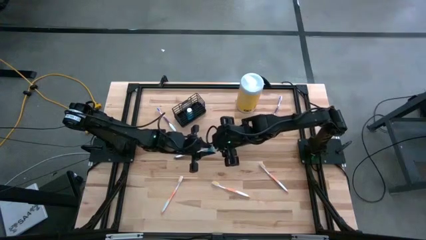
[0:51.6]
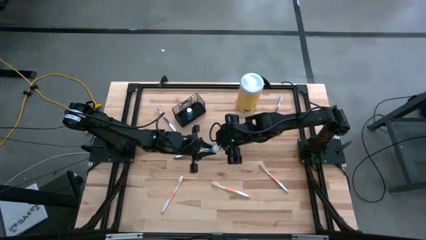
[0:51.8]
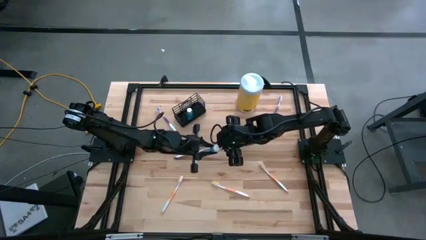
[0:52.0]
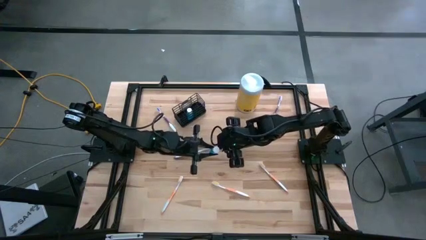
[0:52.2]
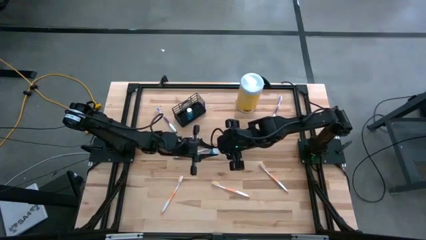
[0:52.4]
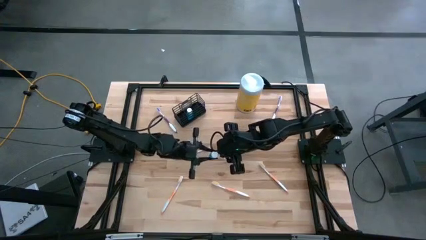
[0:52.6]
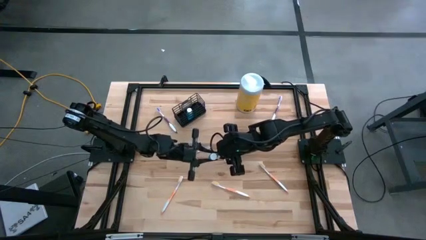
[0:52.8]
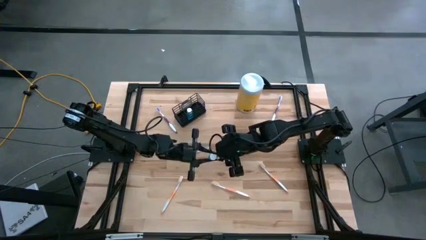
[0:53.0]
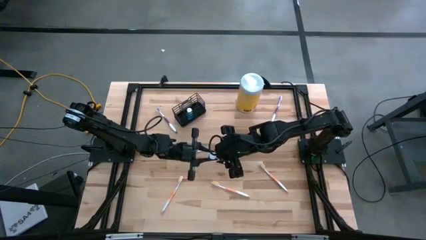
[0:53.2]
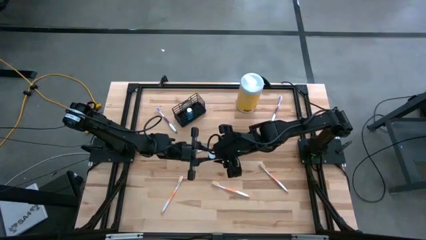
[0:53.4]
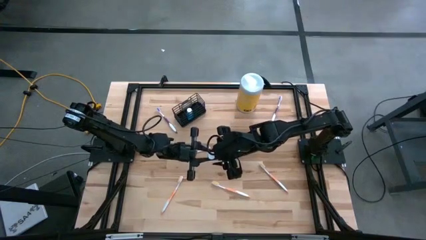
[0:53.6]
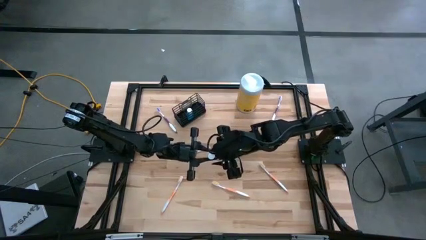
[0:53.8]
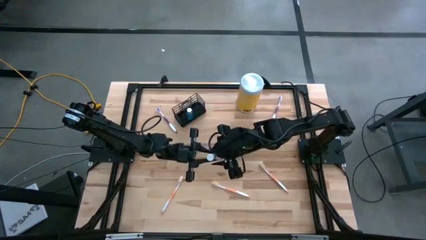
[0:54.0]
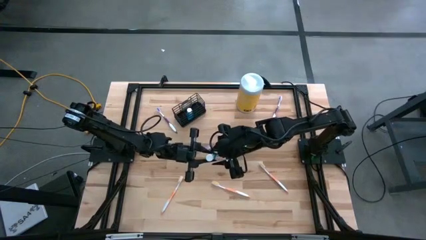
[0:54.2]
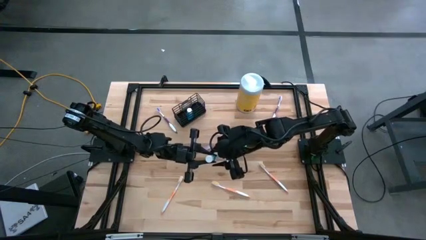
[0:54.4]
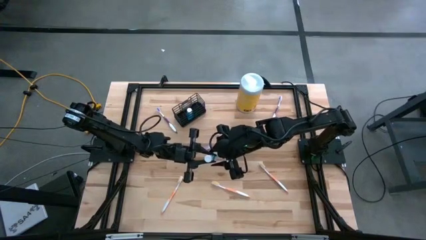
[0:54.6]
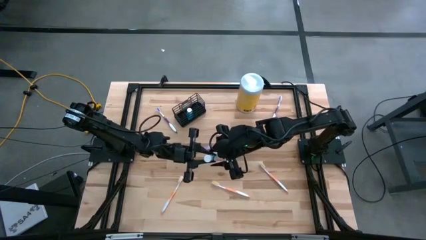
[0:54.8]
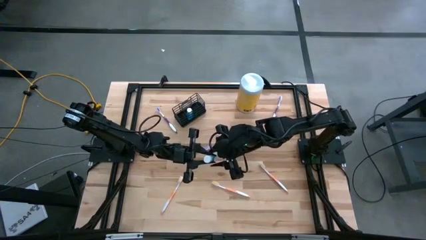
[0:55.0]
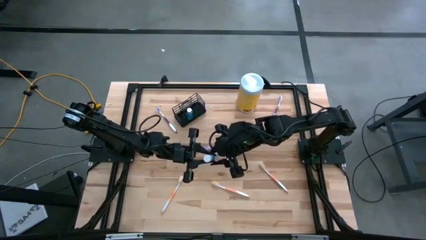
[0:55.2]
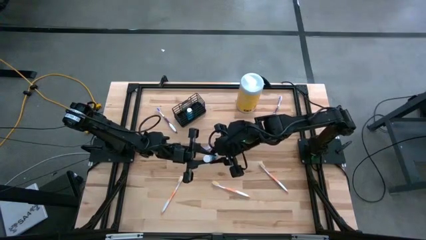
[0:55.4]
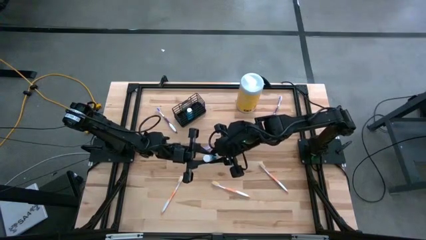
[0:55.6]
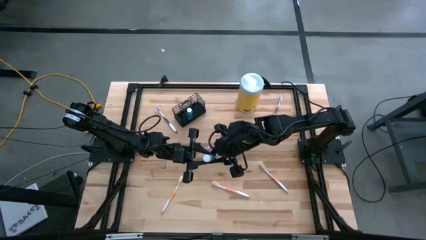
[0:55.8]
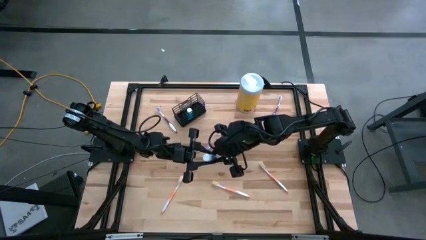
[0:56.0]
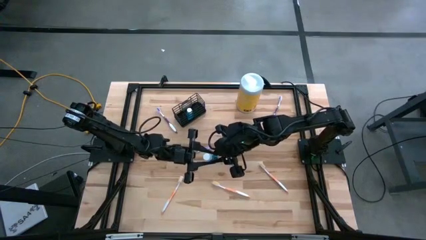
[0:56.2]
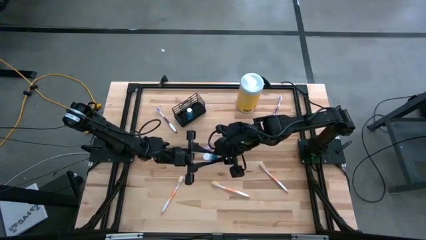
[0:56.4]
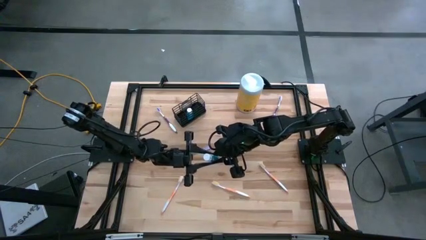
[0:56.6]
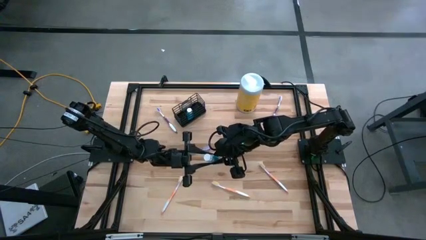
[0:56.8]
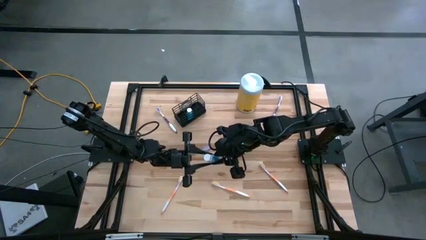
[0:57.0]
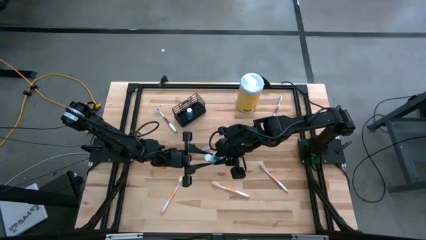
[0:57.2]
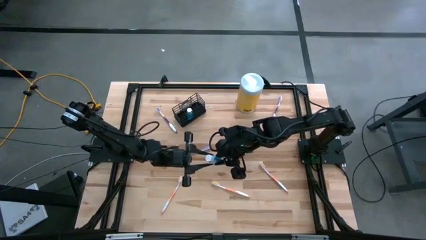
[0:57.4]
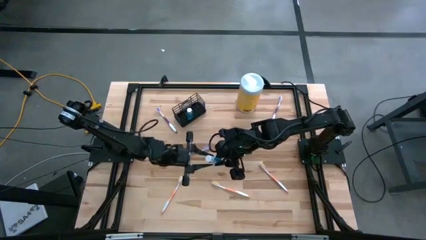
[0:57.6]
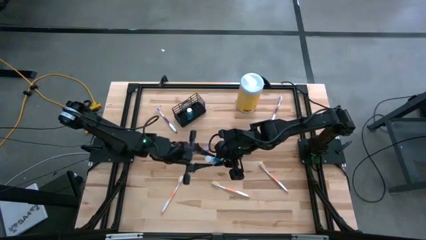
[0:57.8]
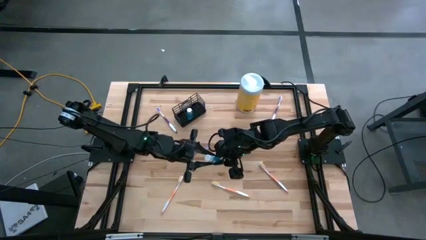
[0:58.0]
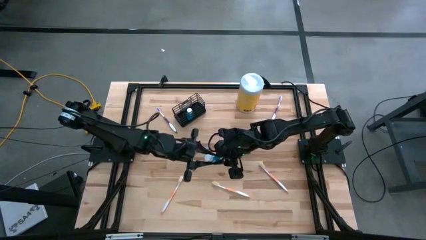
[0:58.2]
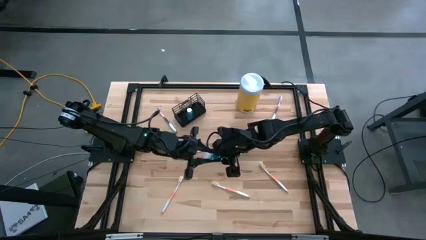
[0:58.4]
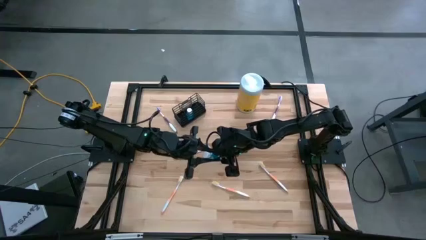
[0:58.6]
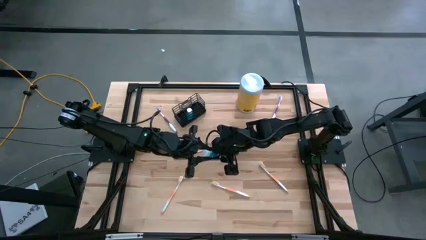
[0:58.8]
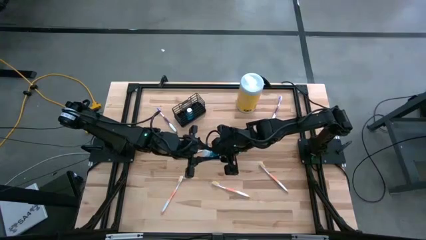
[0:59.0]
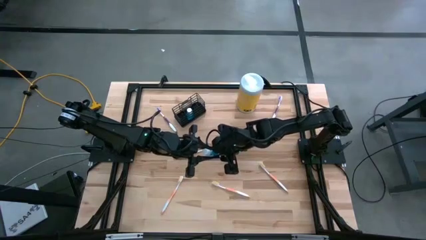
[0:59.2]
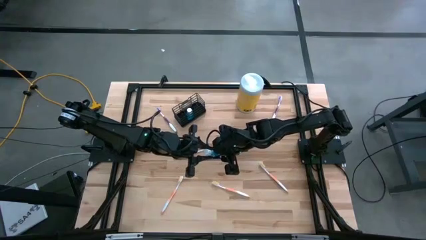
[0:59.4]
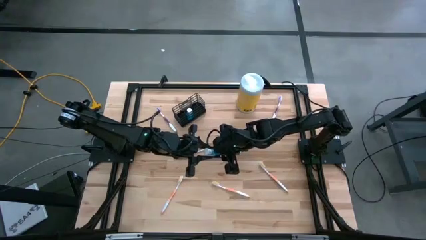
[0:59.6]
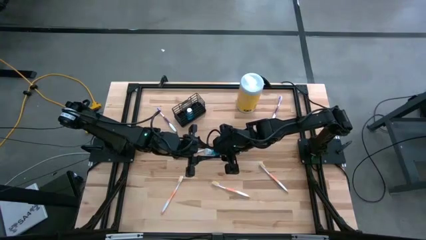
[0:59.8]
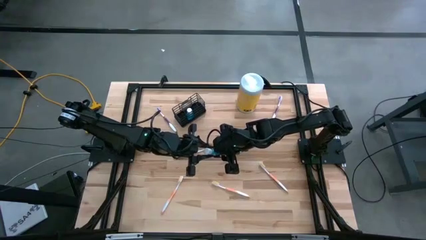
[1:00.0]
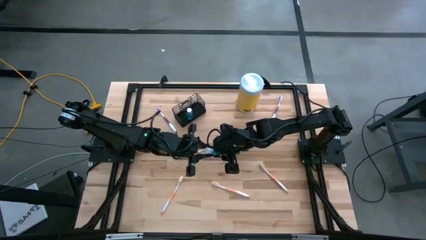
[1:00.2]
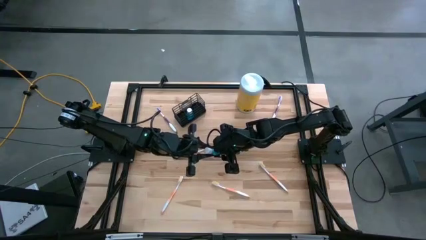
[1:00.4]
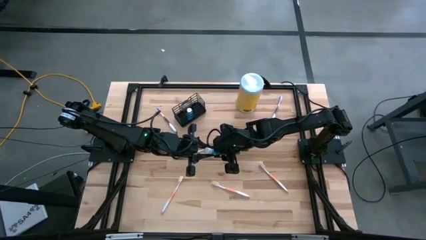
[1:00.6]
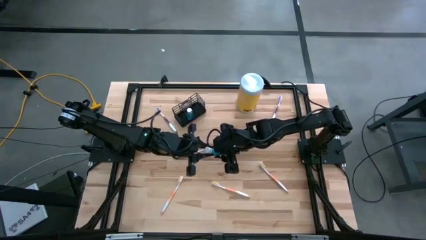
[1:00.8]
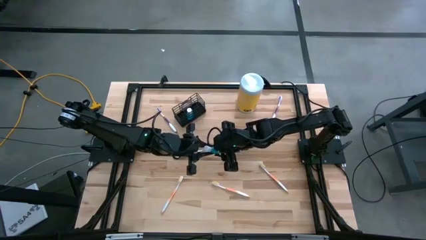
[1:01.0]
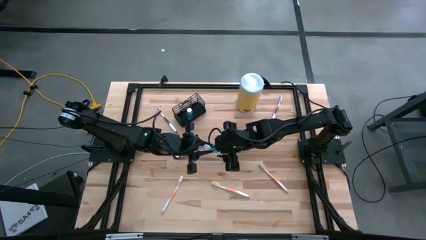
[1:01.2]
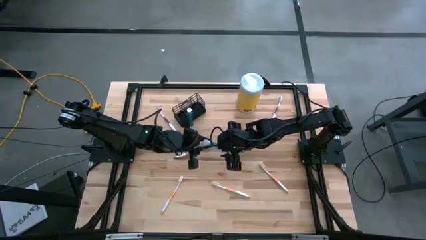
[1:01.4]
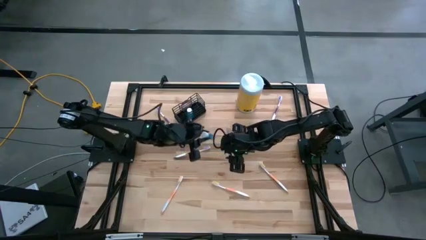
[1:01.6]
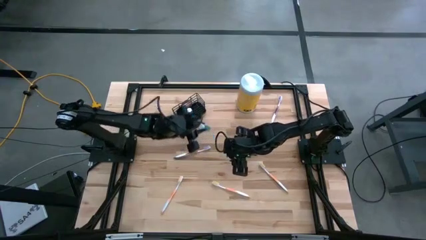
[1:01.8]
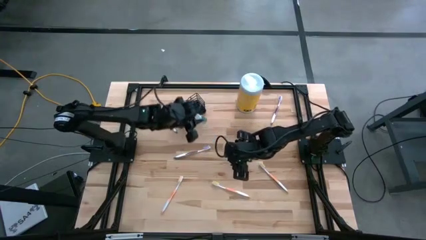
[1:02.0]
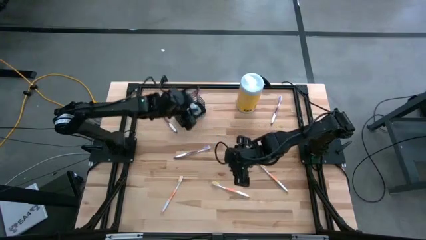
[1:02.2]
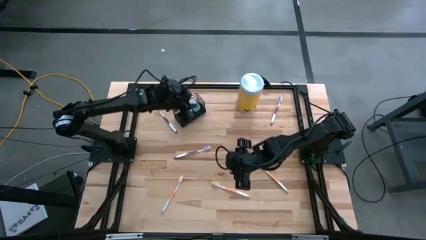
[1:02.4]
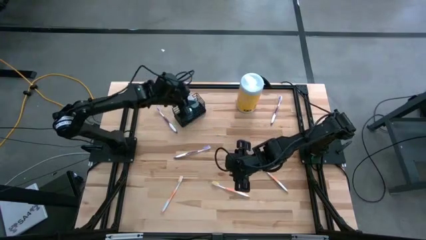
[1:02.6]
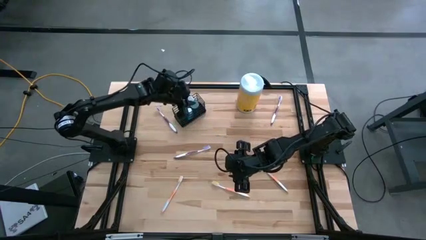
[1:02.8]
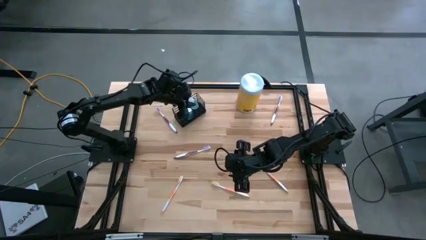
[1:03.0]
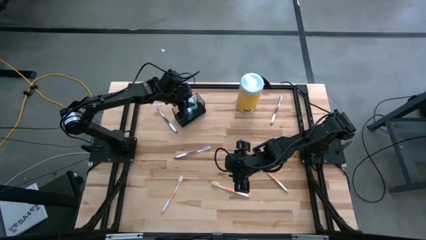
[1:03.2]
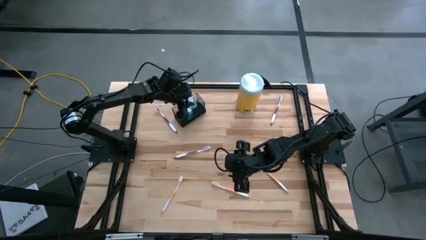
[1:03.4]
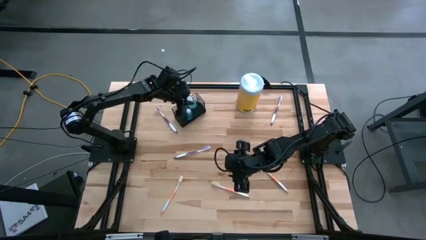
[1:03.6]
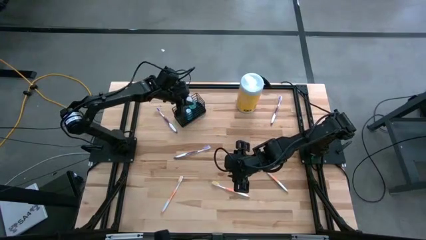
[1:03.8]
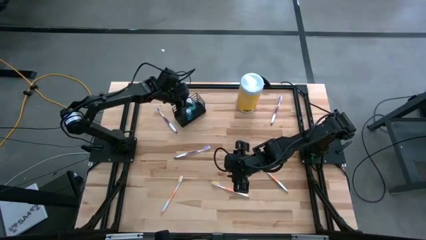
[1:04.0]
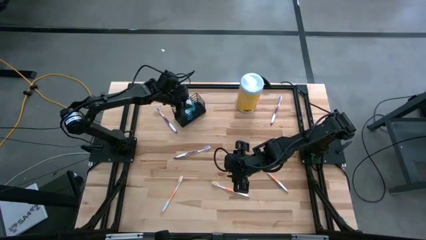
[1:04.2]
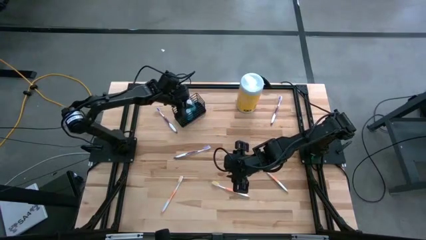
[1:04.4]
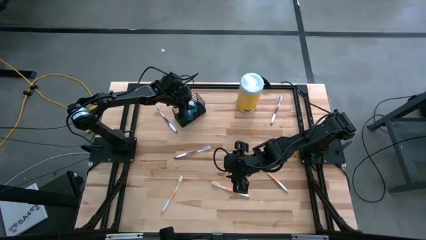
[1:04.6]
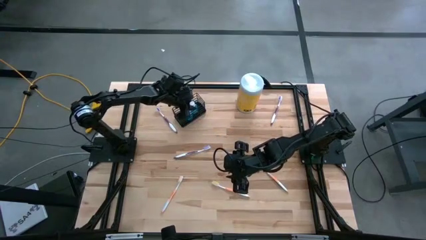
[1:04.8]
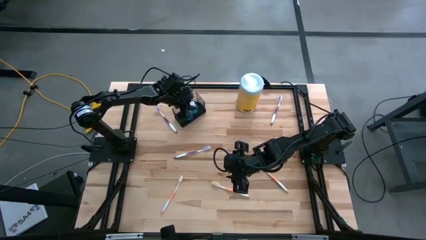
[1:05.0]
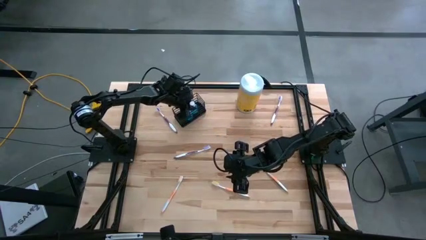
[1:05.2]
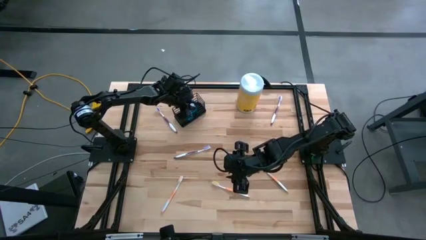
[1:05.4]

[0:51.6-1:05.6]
Task: Pick & Place toothbrushing station
Put the mouthwash into the middle section of the wire organizer
